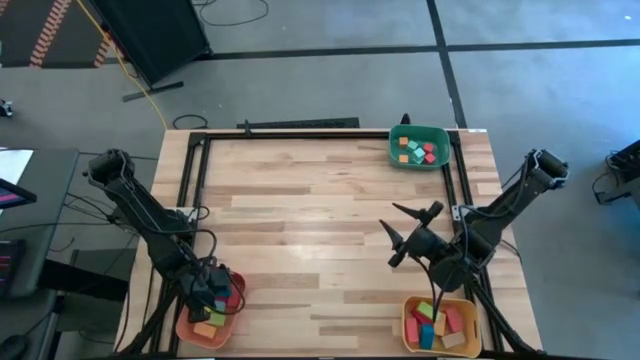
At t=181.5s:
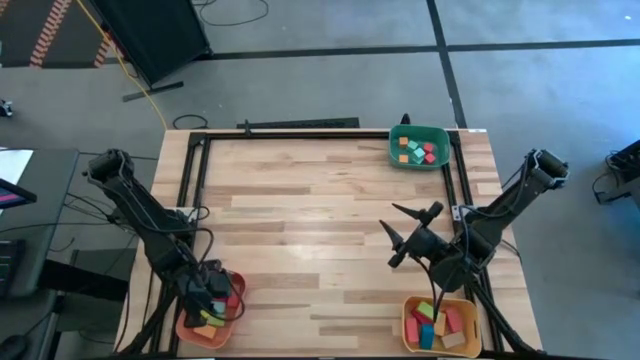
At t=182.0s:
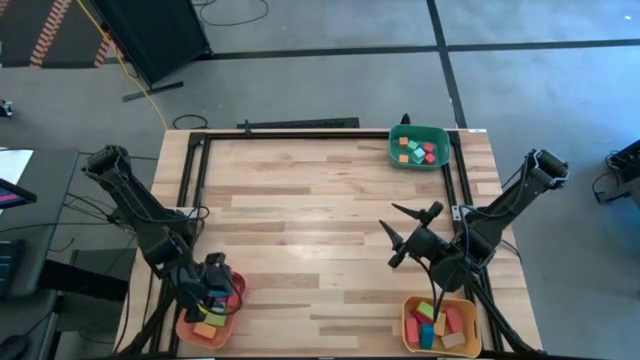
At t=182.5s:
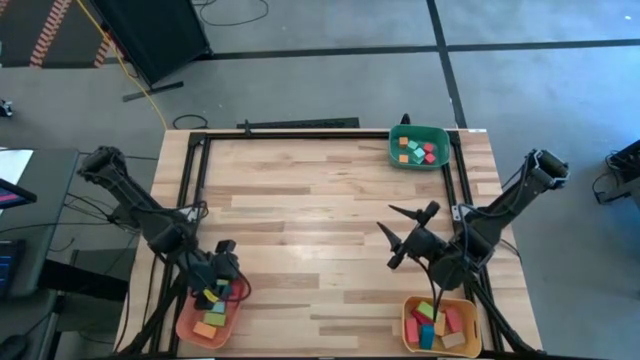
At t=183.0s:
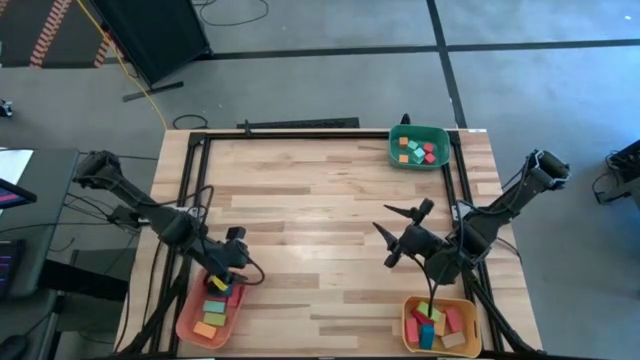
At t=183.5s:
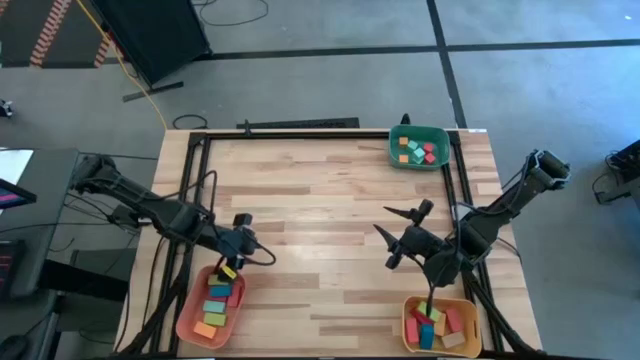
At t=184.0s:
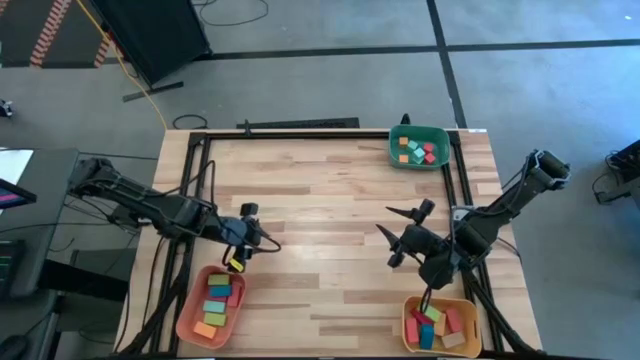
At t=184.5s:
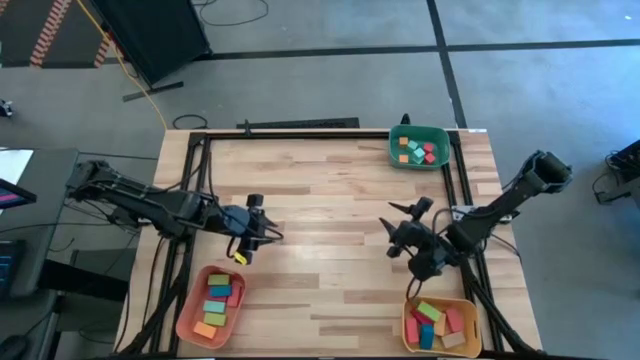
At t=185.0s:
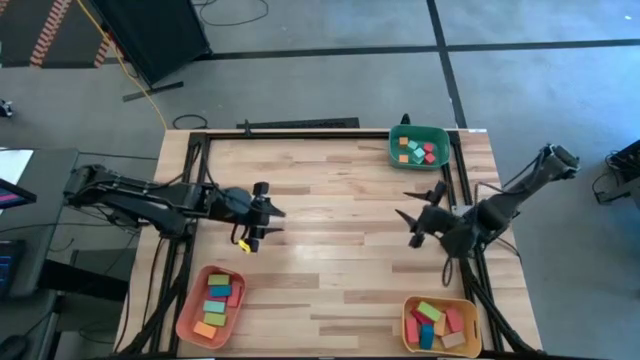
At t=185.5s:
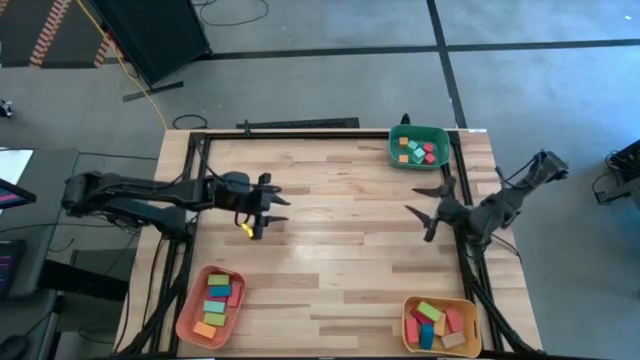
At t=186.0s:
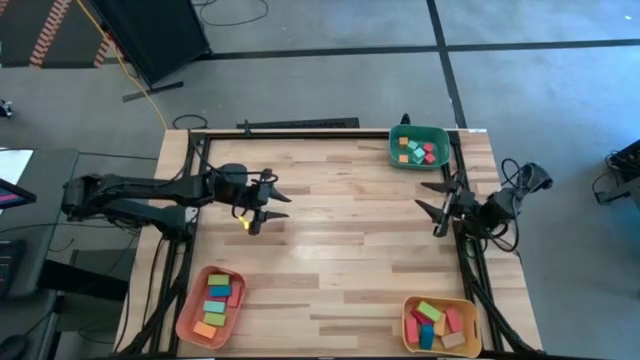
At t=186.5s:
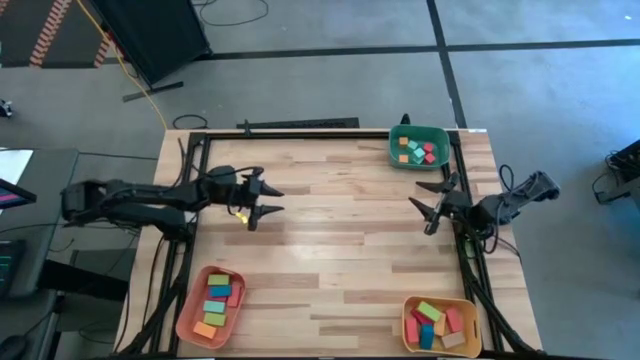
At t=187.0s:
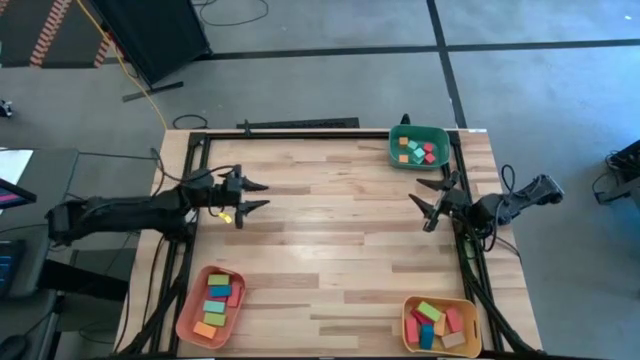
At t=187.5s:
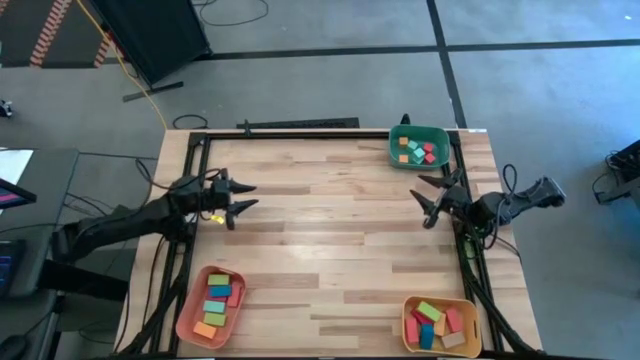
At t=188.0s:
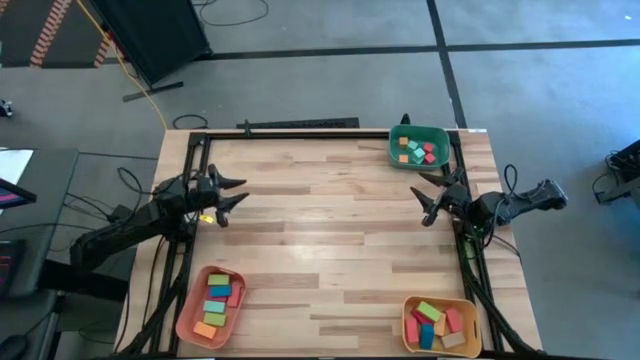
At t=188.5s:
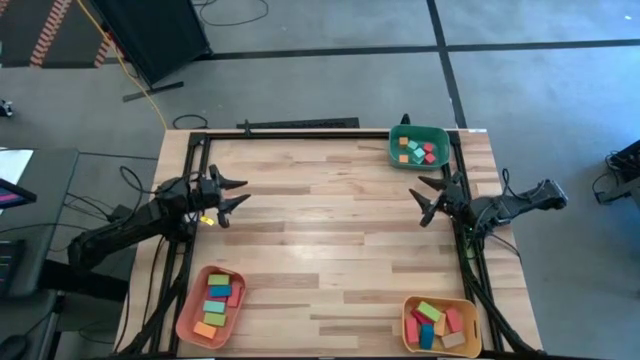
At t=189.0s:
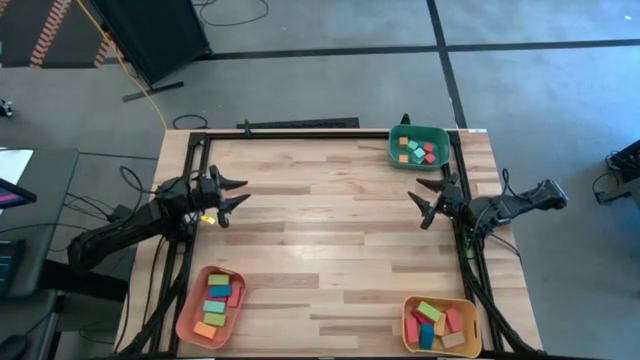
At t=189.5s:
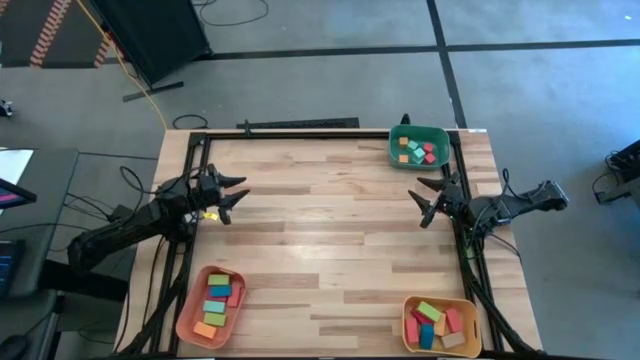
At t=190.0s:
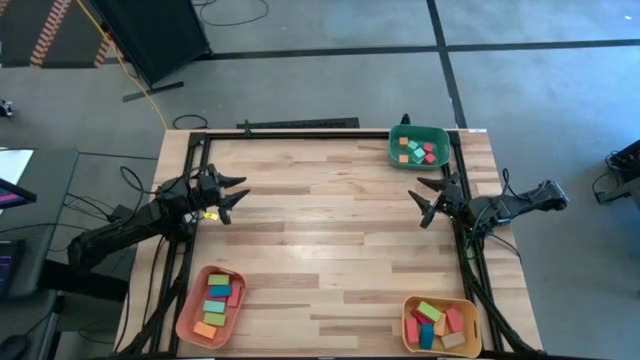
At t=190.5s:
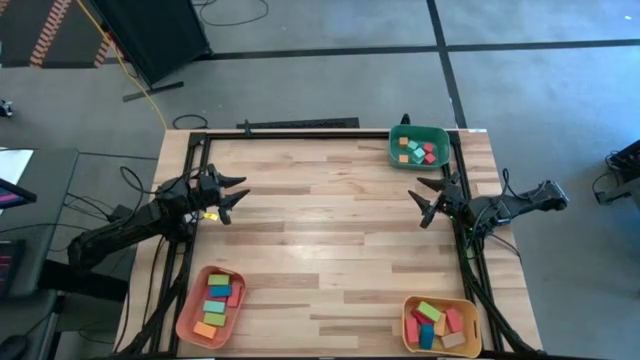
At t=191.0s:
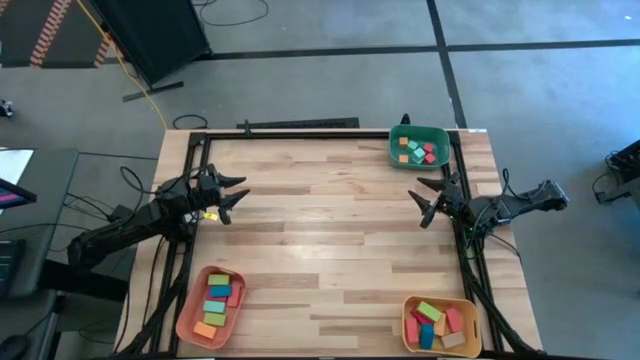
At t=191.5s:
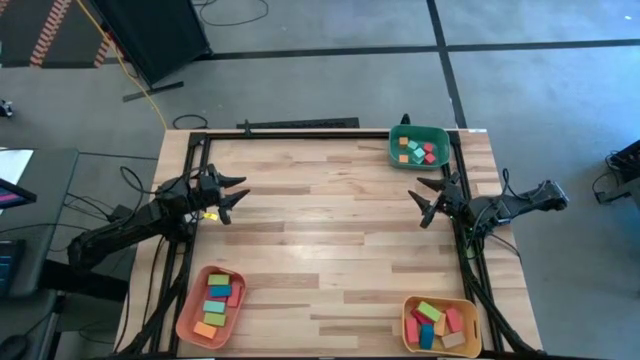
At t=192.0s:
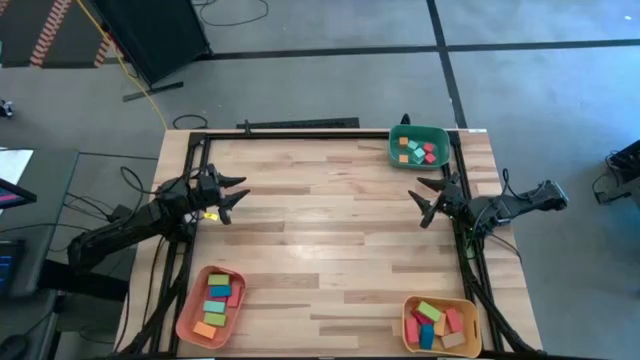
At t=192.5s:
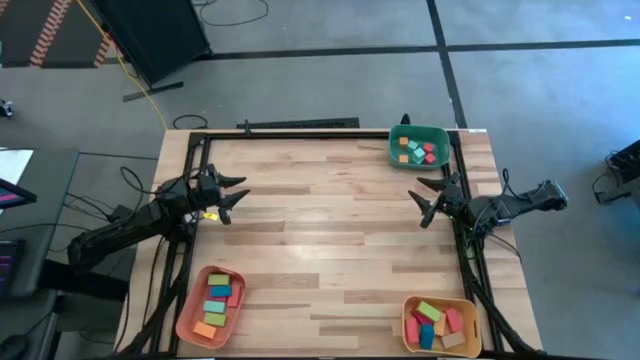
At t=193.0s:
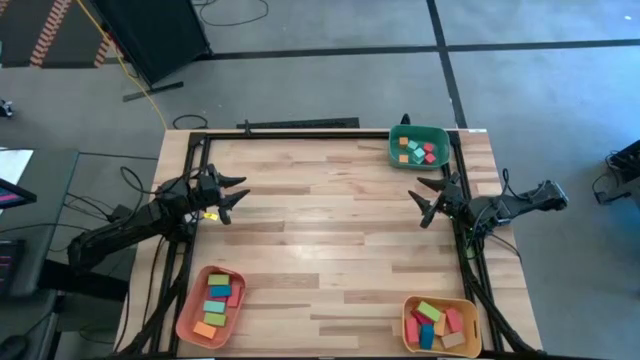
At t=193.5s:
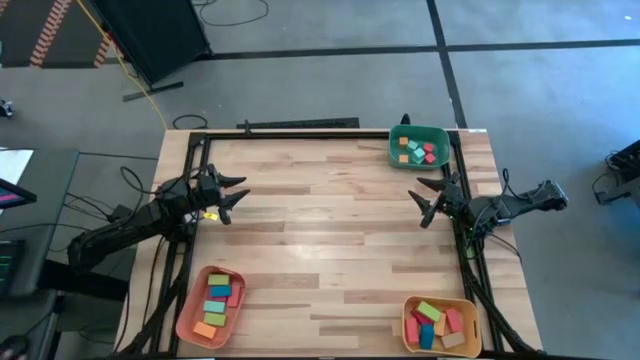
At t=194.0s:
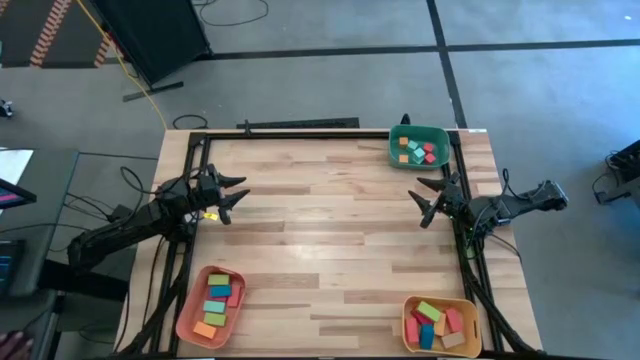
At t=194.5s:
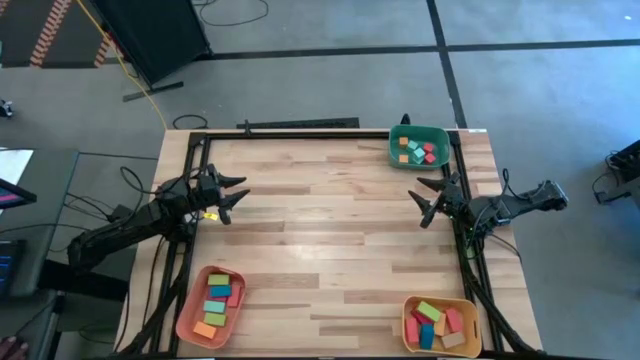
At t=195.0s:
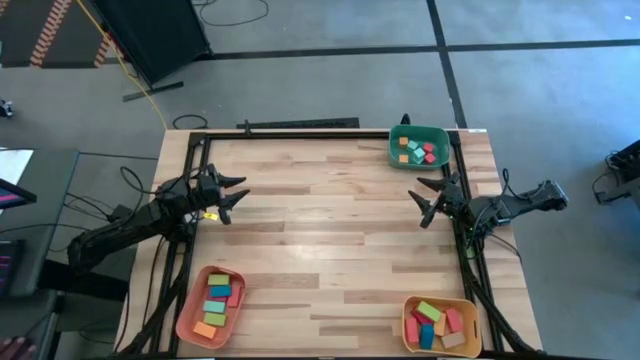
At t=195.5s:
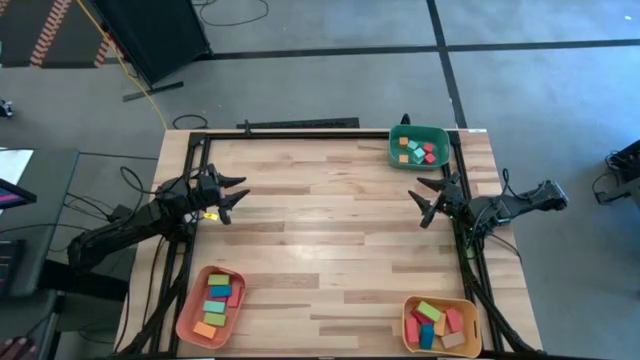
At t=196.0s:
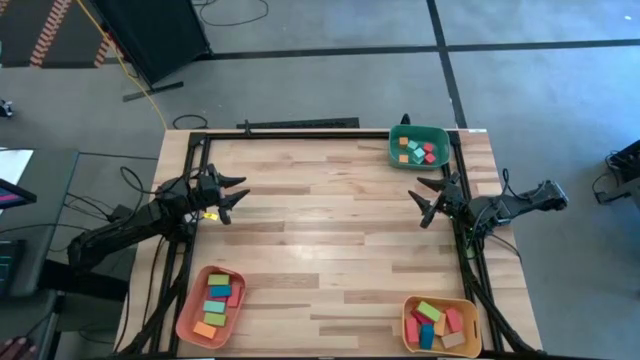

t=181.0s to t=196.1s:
Task: Sort blocks by size
Return to Home Position
